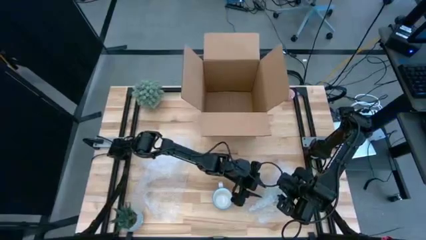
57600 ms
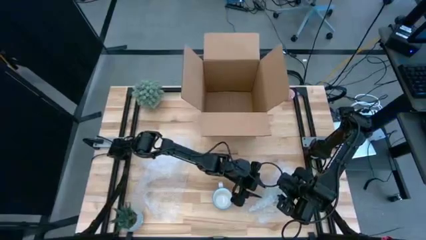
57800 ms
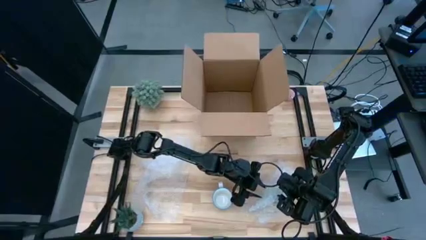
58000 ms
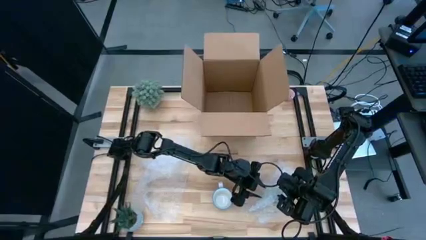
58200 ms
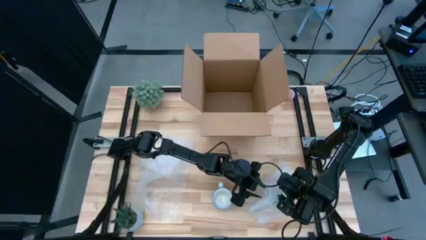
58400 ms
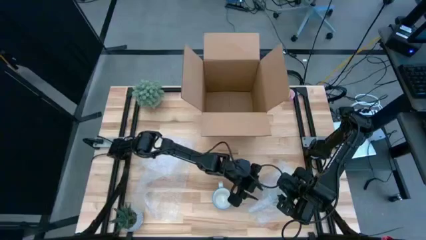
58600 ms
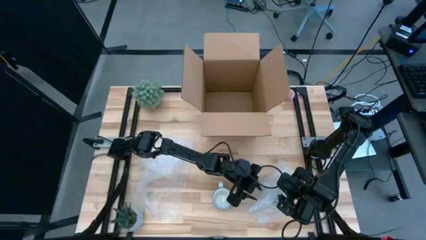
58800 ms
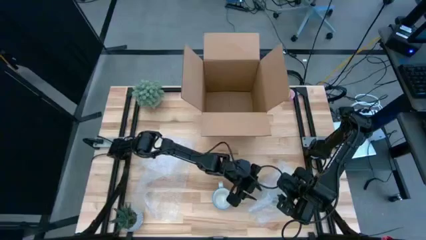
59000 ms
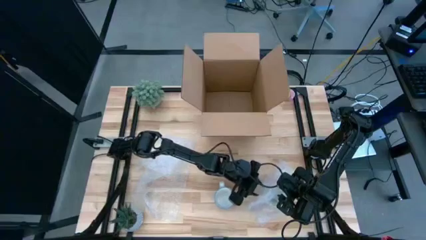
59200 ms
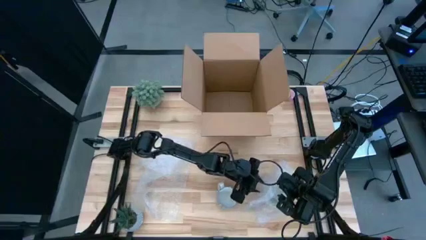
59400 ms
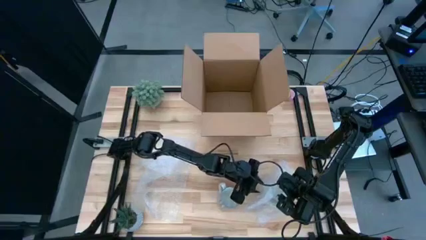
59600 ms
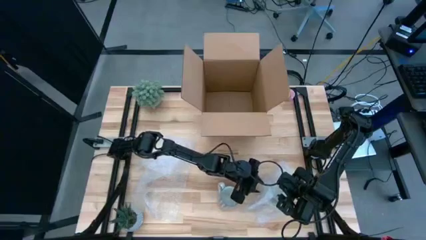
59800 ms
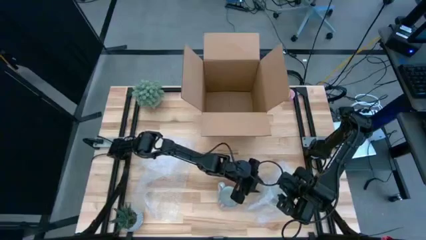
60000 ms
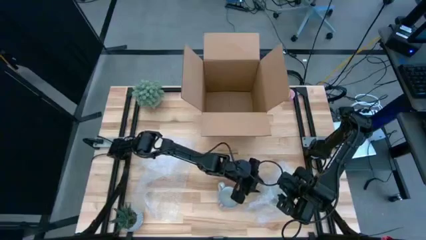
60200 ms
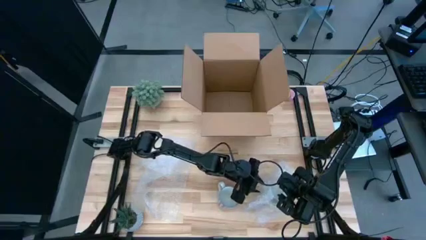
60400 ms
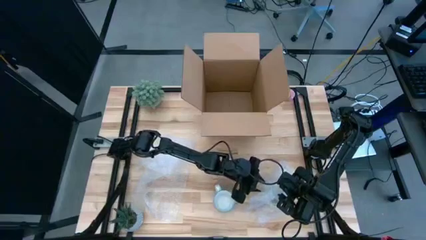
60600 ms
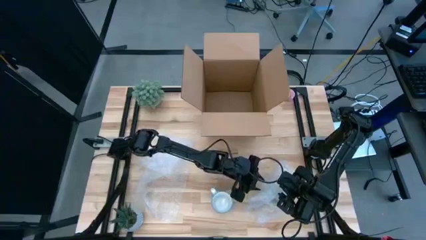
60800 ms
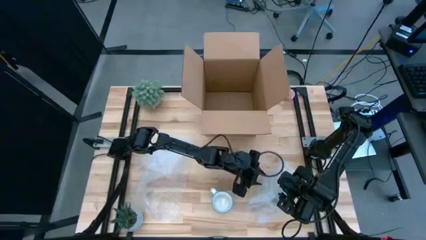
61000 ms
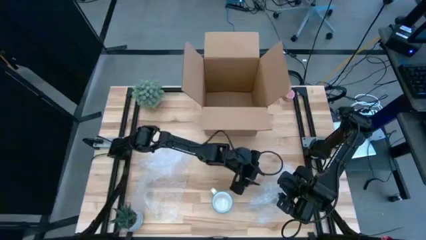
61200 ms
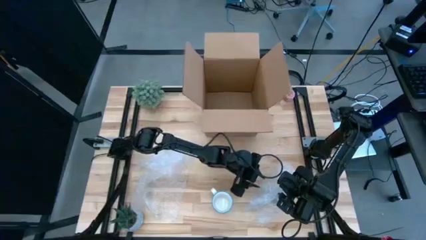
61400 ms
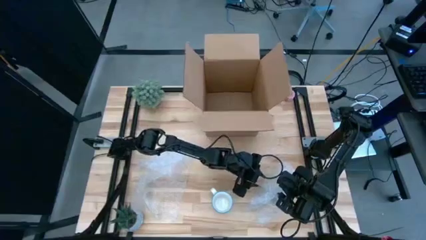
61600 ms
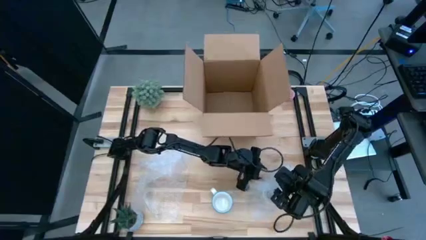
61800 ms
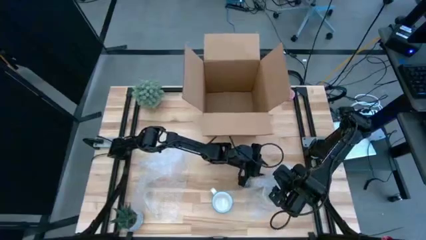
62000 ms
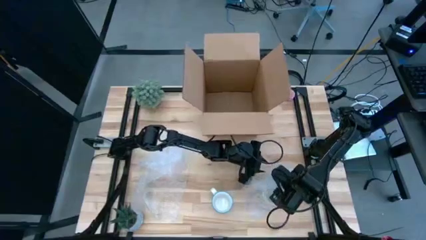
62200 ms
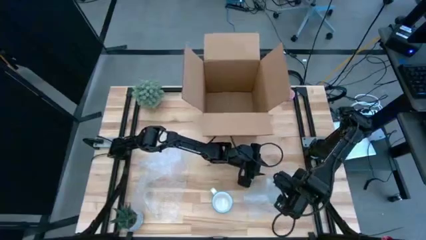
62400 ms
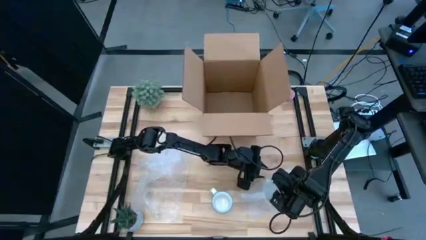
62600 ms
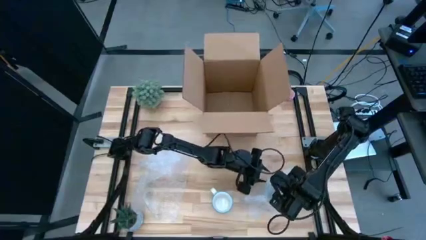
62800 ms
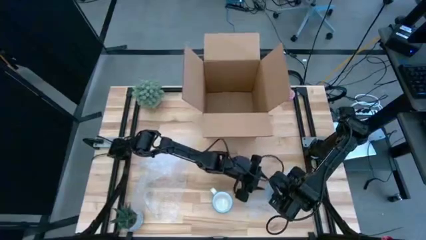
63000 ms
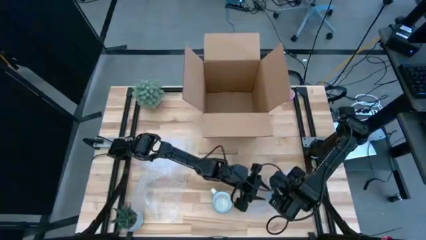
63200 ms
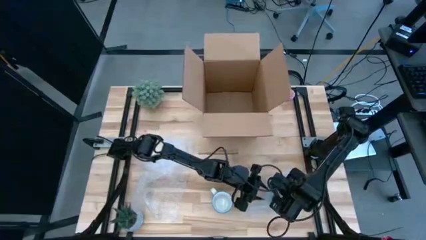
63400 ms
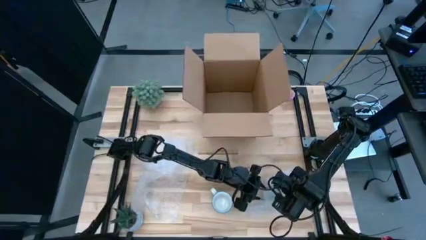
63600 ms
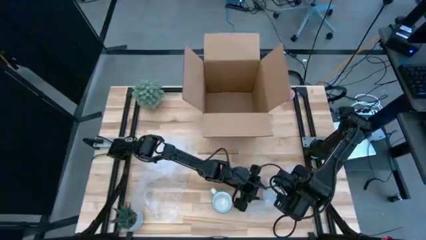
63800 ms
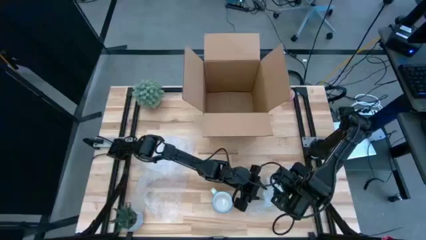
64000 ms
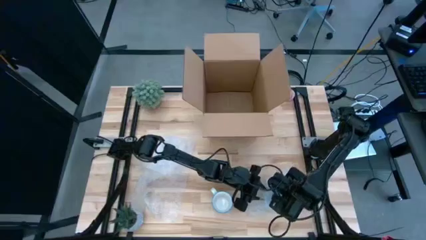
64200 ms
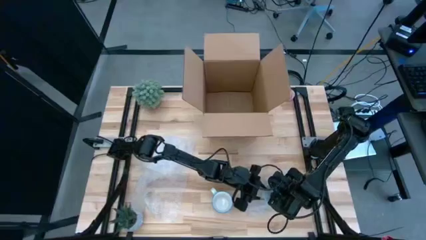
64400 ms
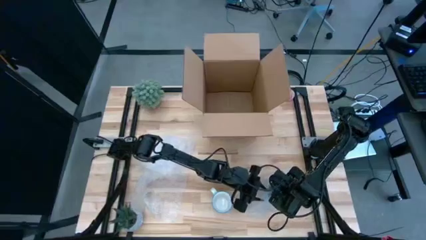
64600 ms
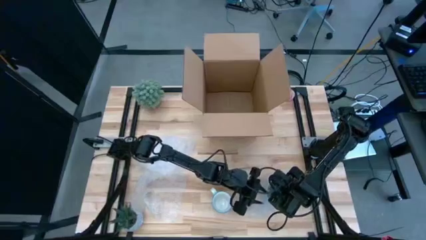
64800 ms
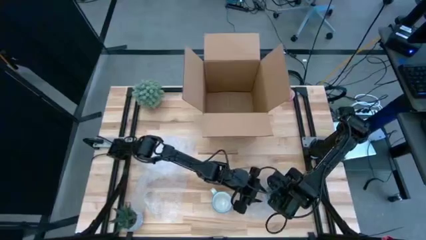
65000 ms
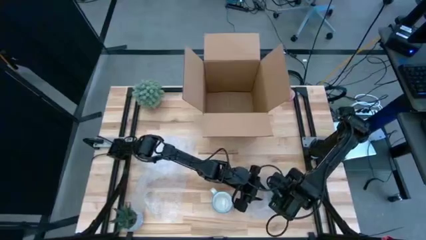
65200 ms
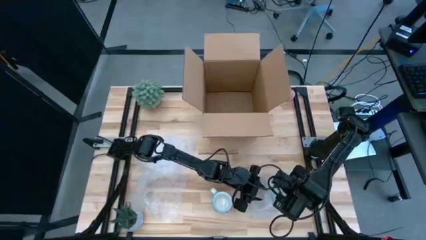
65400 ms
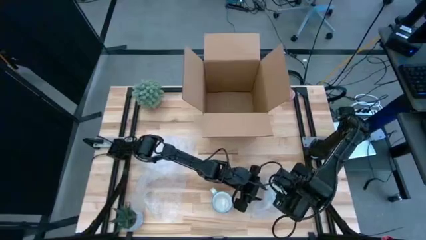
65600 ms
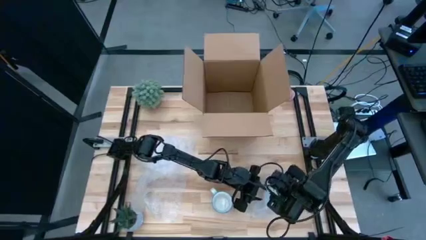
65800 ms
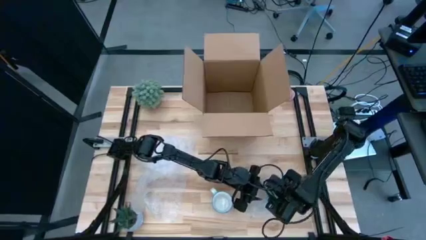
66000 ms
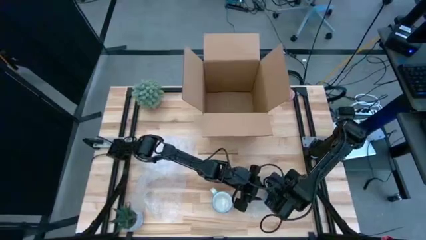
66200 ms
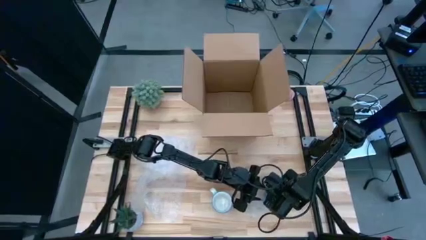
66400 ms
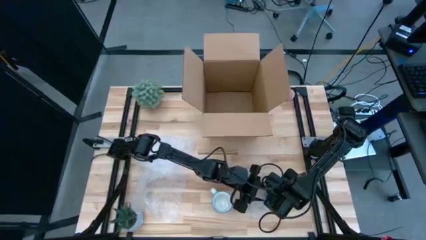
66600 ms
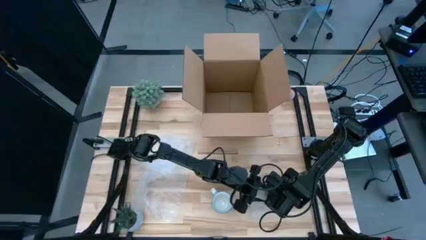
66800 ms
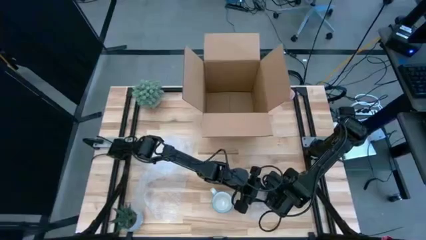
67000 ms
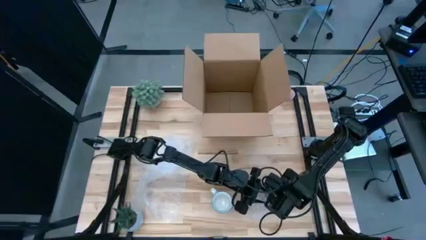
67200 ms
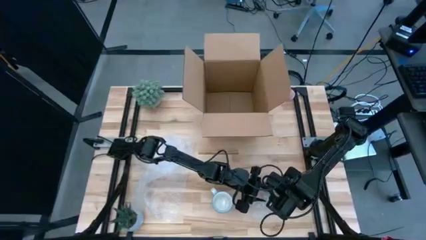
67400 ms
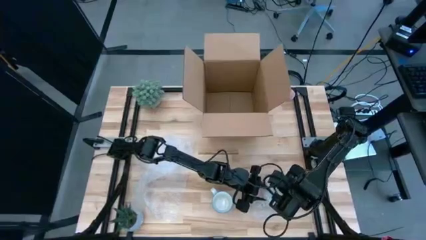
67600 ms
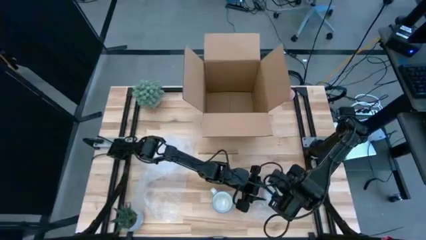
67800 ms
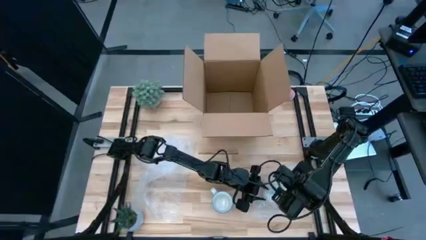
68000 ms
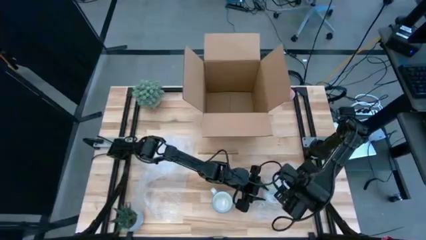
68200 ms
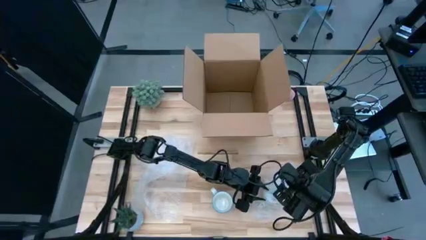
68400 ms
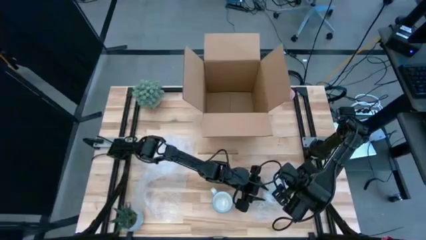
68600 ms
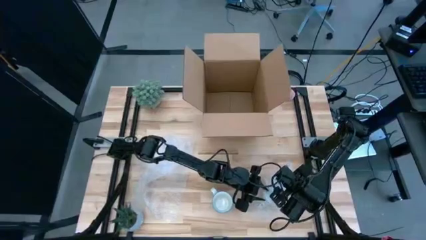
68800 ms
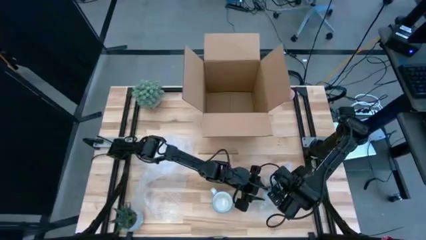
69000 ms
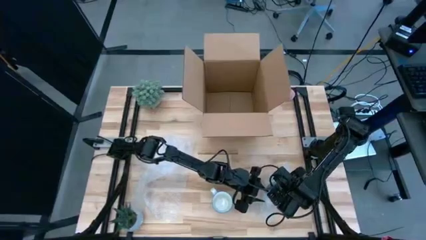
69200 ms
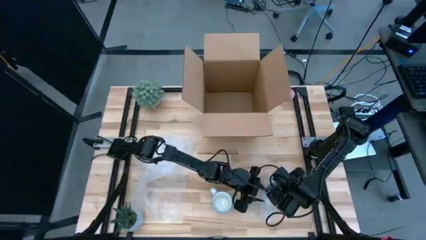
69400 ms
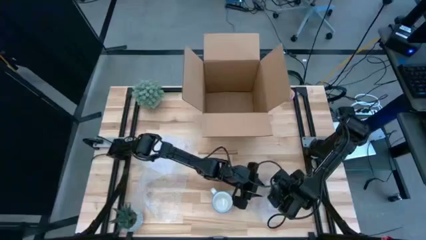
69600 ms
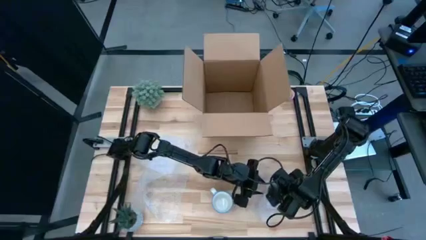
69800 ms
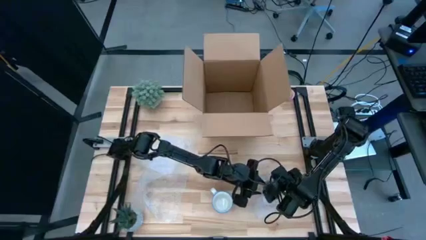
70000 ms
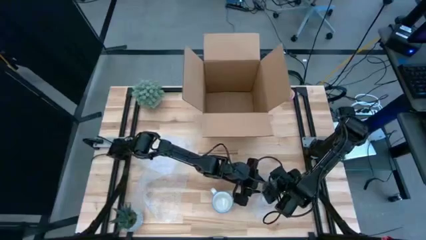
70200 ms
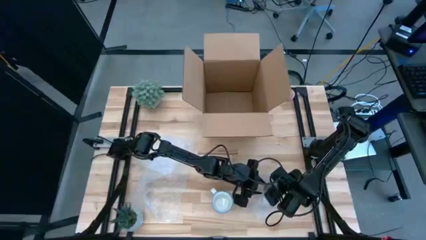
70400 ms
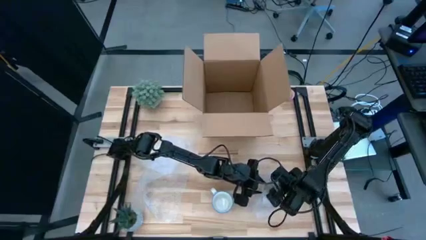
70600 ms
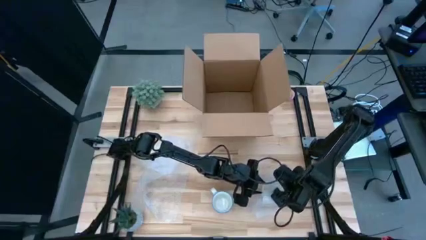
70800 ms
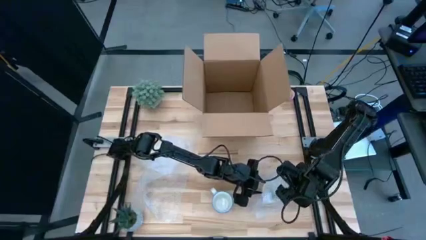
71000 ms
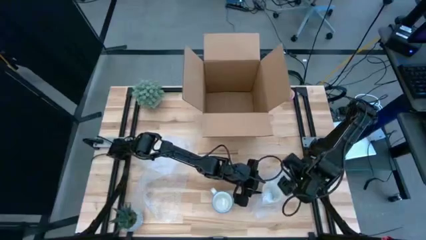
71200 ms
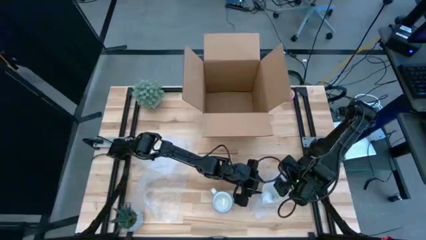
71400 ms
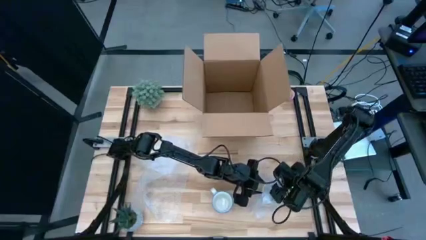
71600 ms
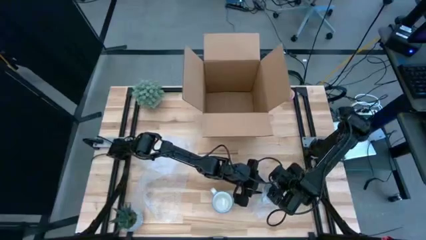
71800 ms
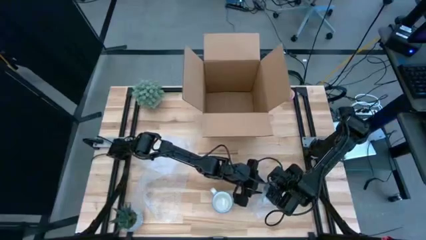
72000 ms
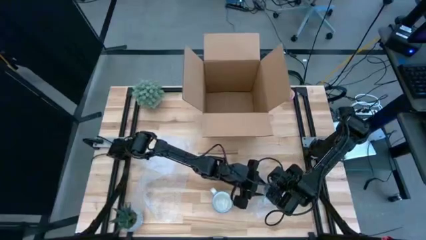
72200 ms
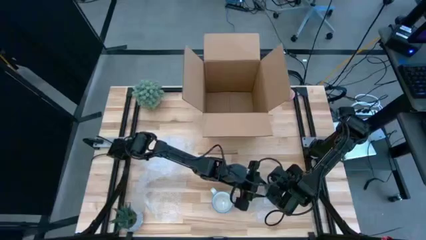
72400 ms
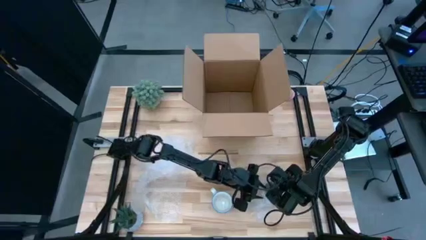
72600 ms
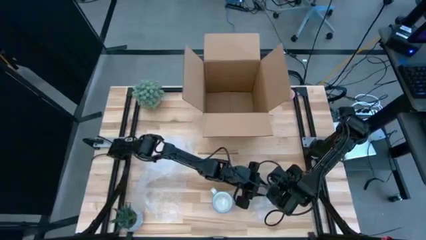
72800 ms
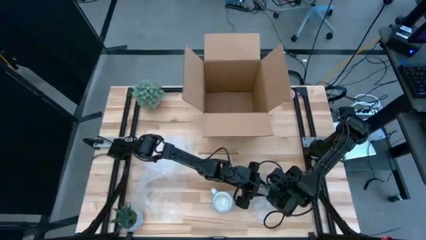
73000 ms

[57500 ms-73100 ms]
Task: wrap mug
Wrap the yellow mug with the bubble wrap
